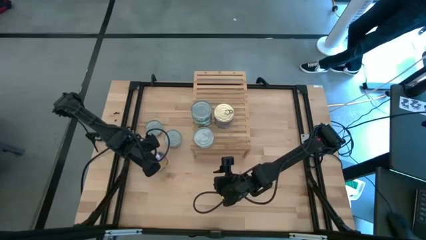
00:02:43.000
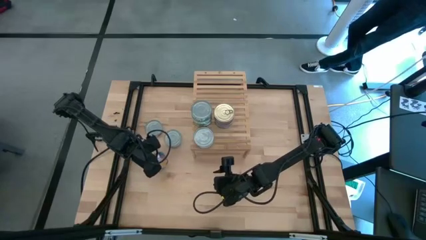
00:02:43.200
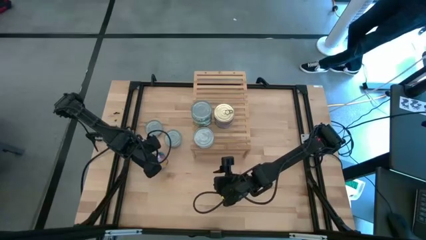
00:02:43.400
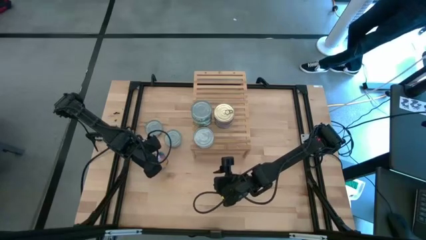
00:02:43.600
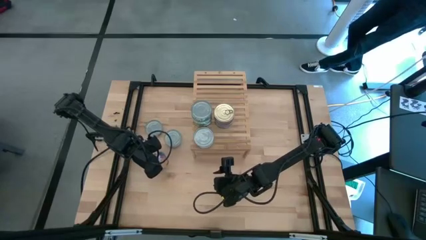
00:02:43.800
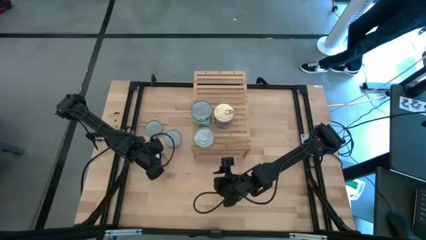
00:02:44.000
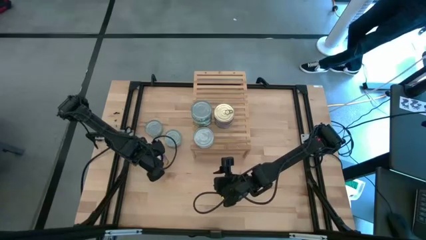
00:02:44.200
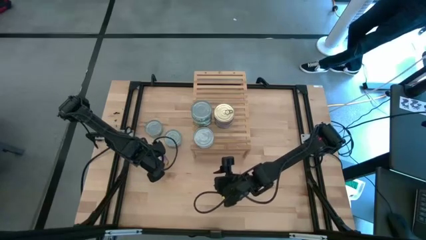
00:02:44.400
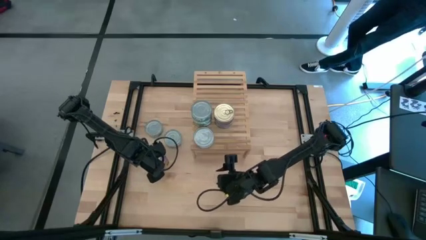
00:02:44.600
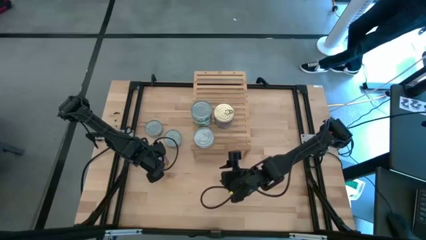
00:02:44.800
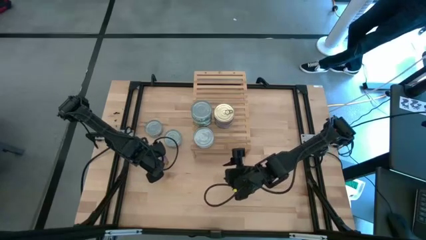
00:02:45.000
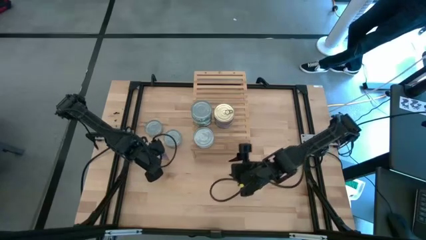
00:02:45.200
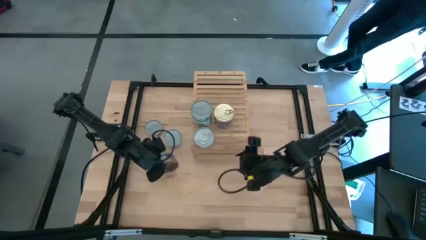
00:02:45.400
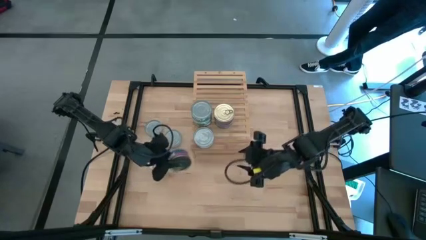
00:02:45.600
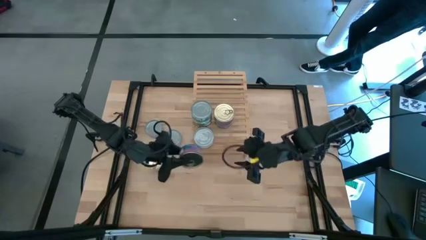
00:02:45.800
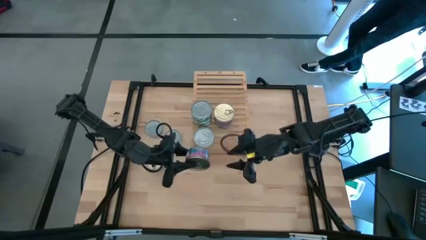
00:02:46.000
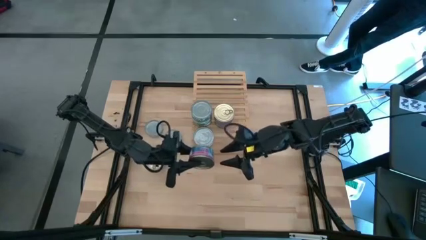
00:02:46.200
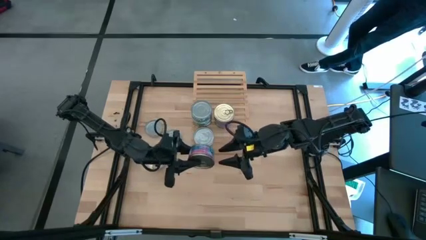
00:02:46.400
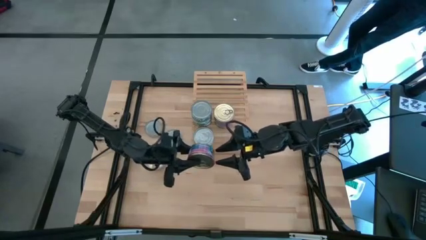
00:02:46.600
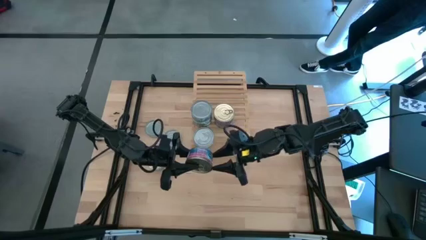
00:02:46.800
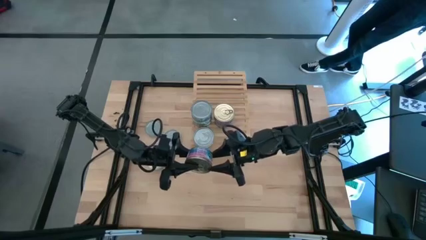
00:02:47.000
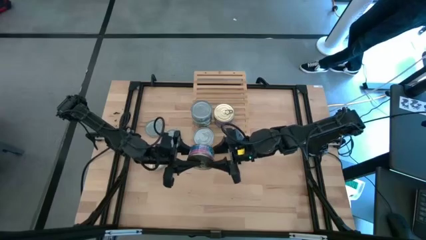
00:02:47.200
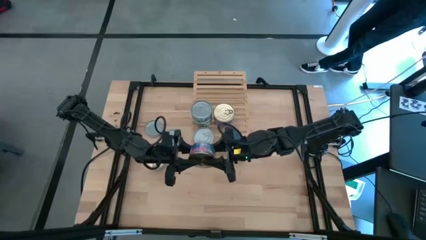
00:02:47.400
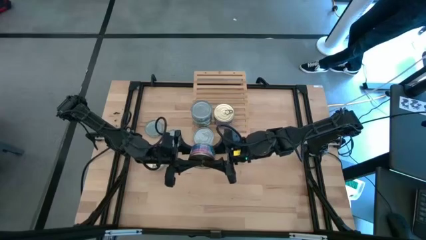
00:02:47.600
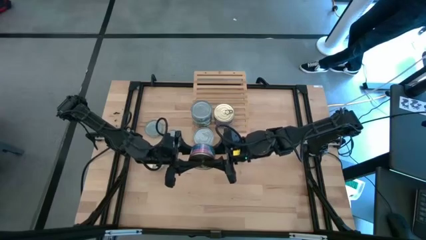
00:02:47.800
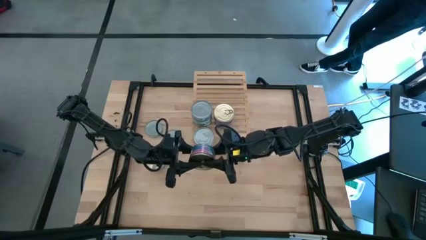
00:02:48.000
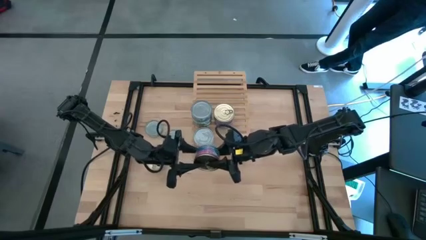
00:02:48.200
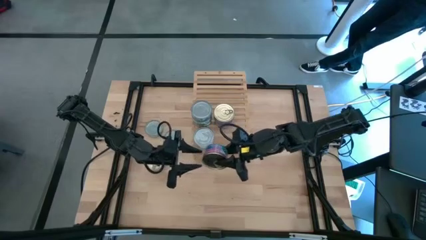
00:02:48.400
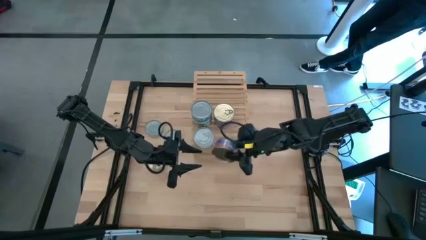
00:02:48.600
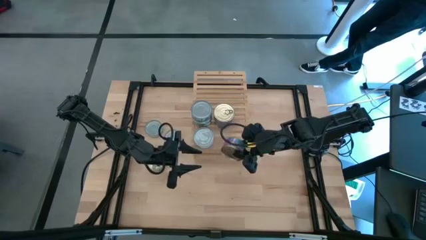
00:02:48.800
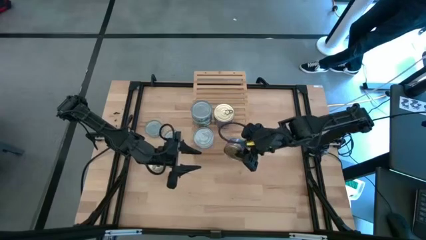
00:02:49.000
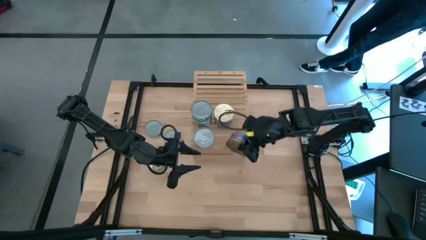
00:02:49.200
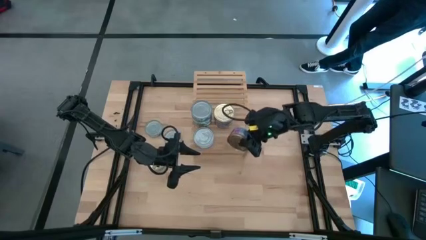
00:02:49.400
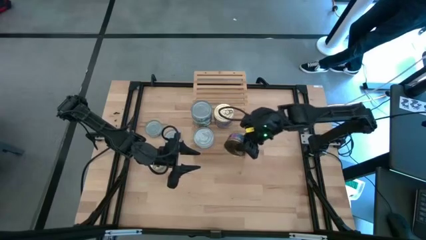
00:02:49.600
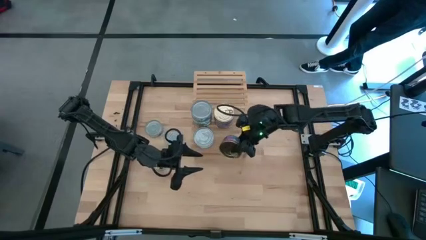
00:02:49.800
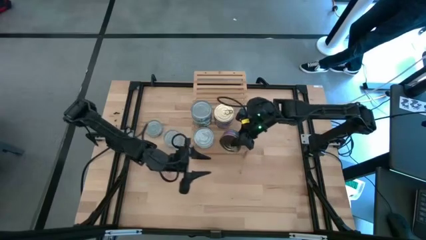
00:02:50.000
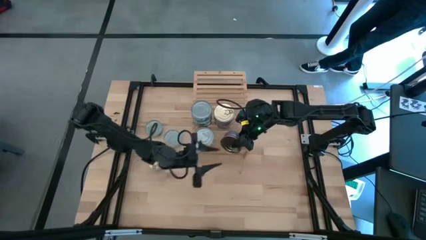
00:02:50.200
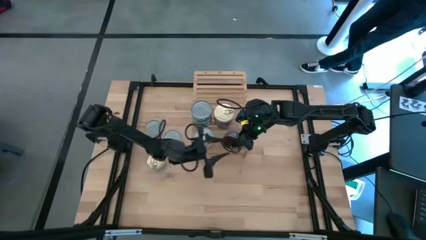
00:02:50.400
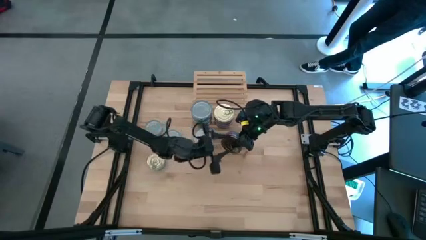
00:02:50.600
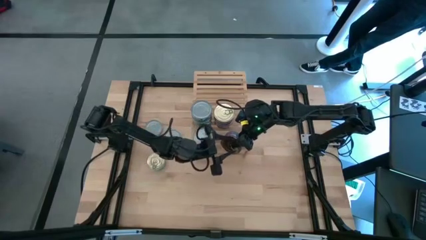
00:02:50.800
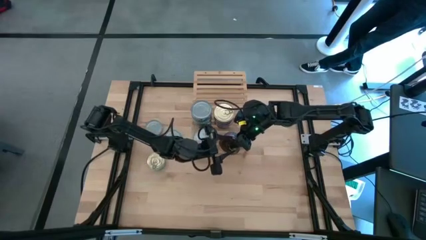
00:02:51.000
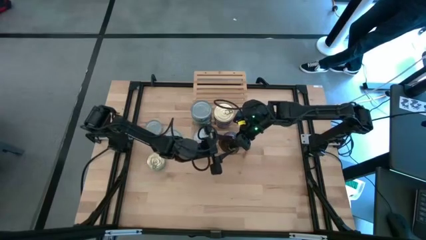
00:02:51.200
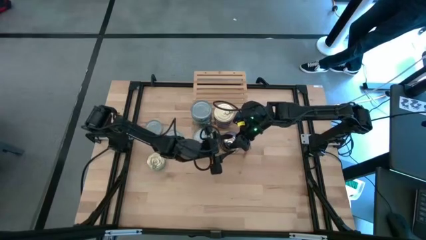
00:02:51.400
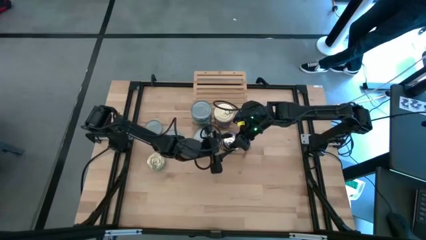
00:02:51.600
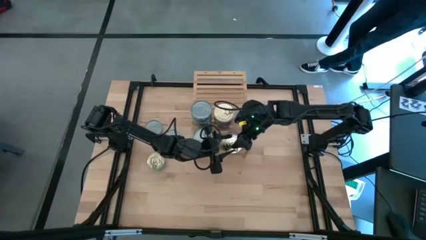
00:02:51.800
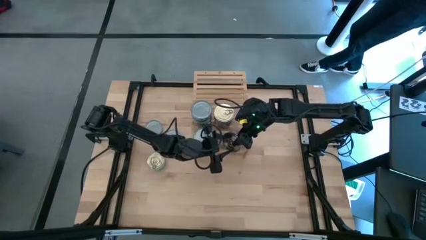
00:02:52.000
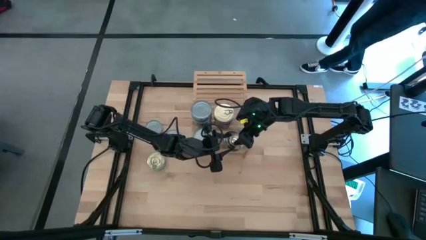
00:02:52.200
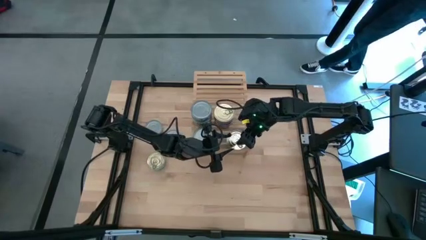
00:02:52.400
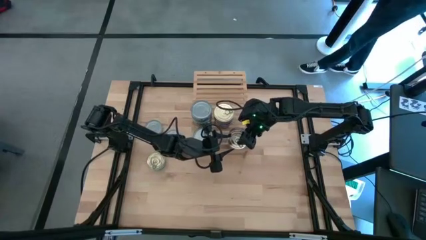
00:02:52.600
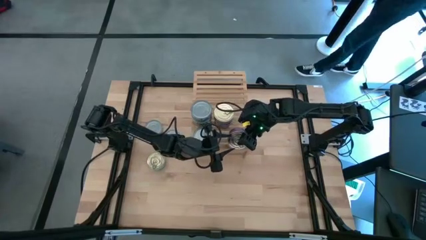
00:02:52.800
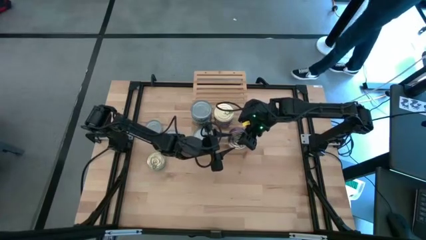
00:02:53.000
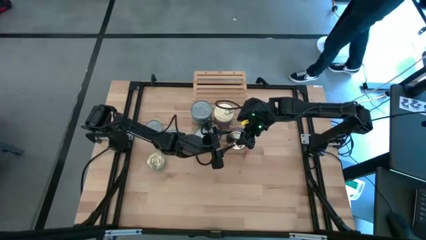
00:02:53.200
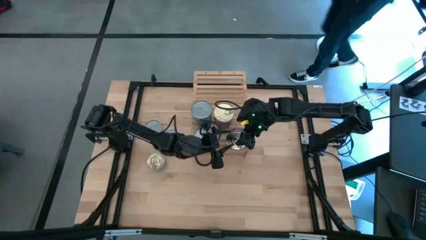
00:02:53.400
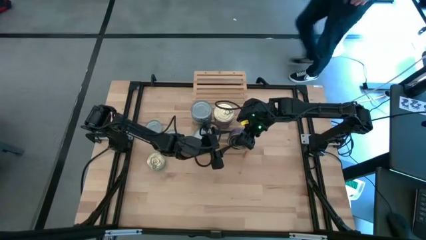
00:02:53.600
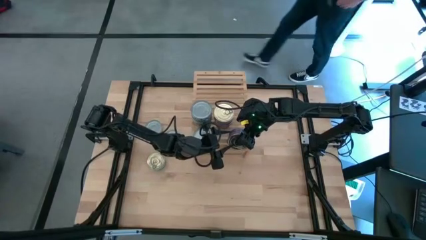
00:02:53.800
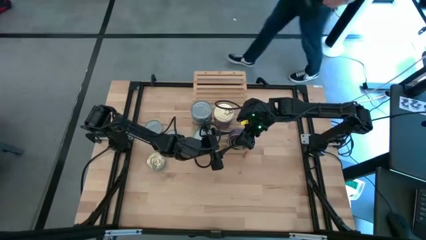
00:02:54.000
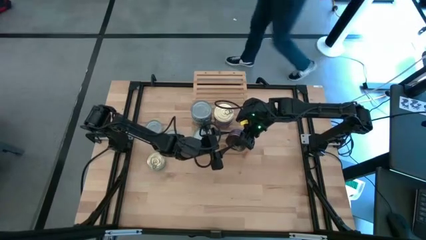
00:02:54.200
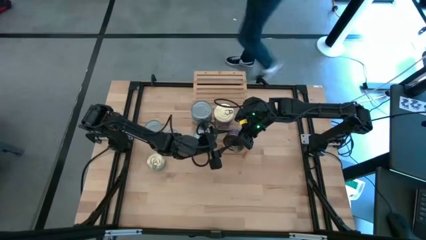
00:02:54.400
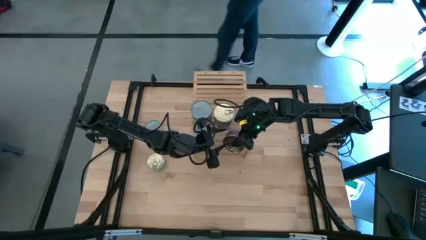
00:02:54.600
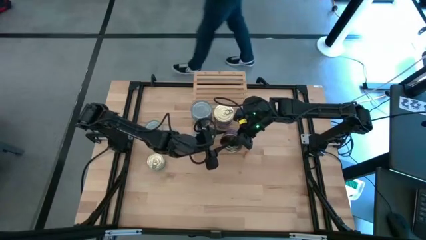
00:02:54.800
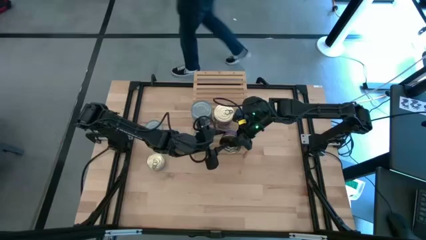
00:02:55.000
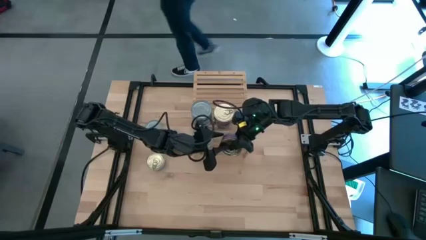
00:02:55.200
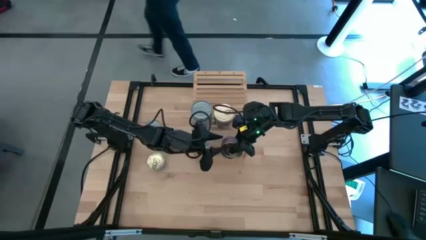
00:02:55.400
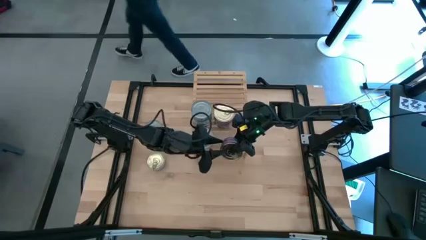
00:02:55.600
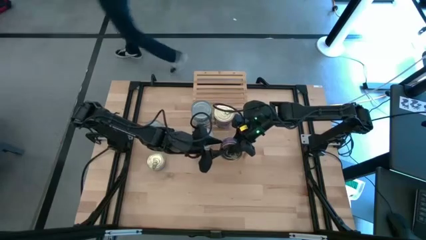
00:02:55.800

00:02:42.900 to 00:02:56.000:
Task: Stack canned seafood by type on shelf
Put the blue tuna can on the shelf

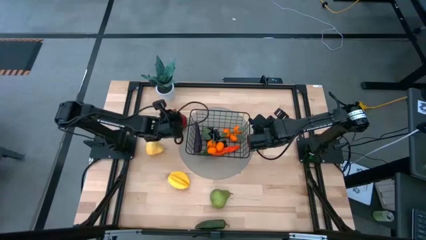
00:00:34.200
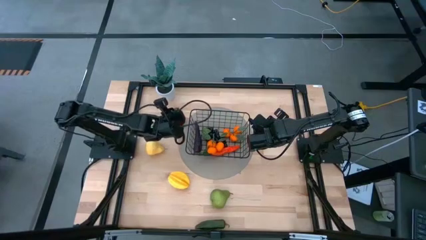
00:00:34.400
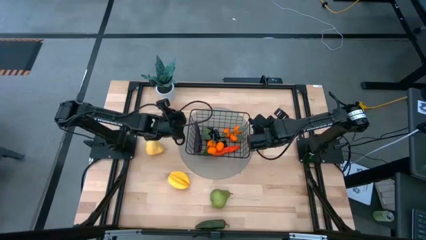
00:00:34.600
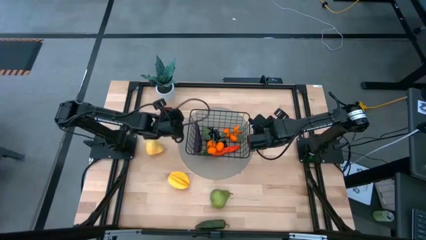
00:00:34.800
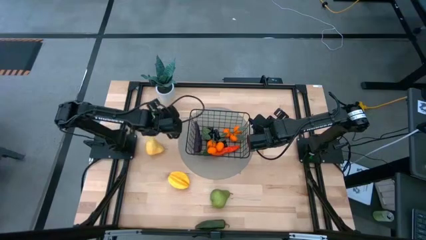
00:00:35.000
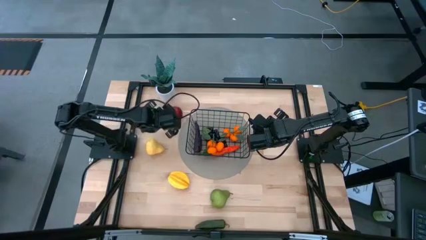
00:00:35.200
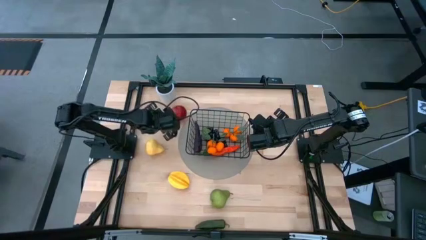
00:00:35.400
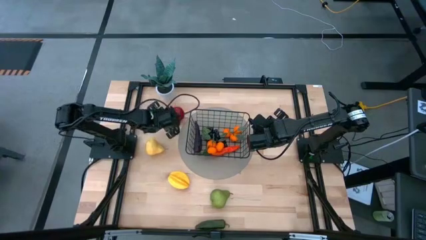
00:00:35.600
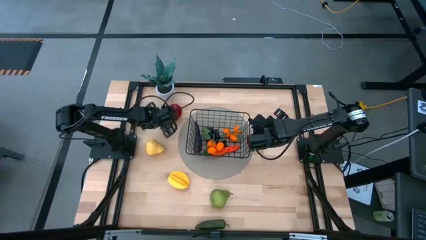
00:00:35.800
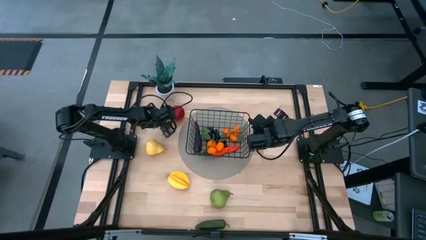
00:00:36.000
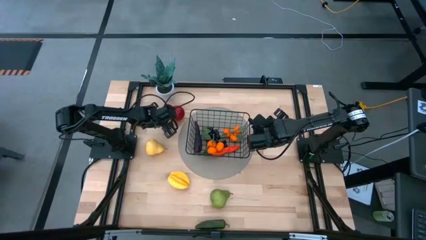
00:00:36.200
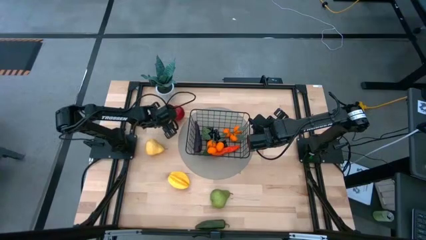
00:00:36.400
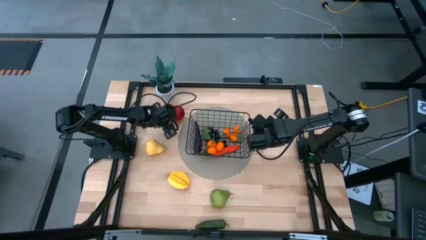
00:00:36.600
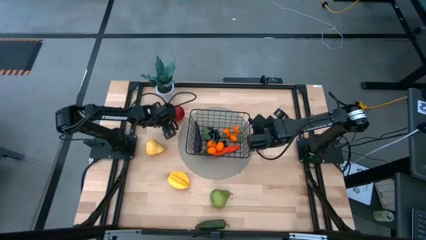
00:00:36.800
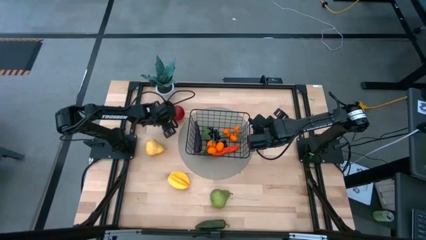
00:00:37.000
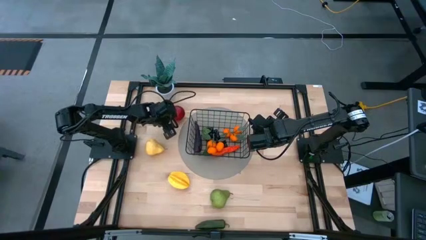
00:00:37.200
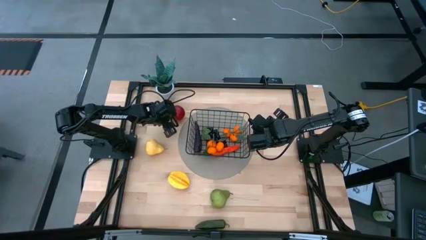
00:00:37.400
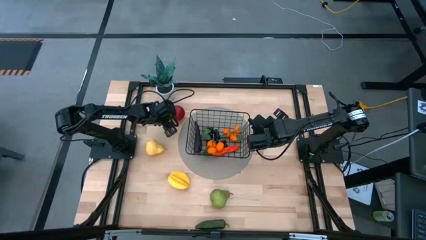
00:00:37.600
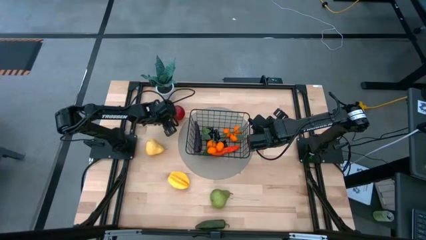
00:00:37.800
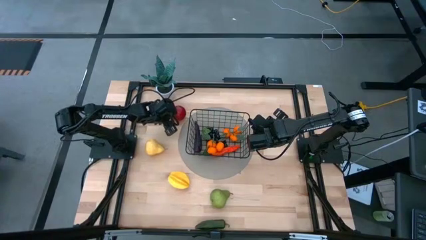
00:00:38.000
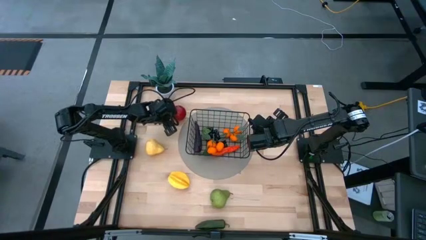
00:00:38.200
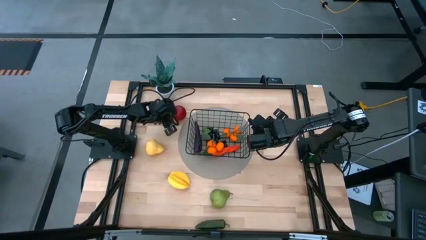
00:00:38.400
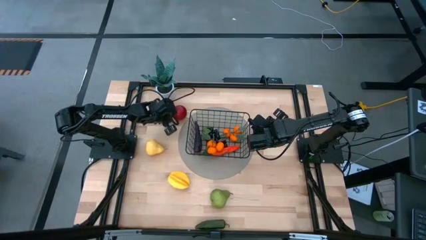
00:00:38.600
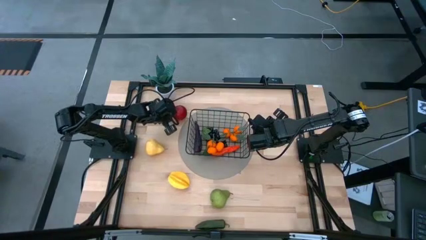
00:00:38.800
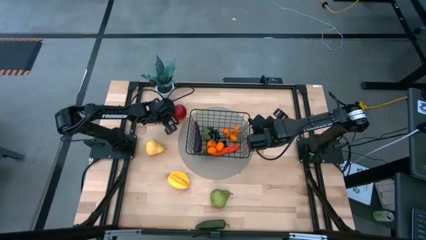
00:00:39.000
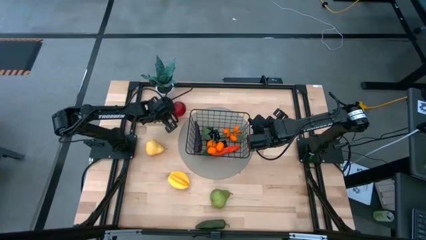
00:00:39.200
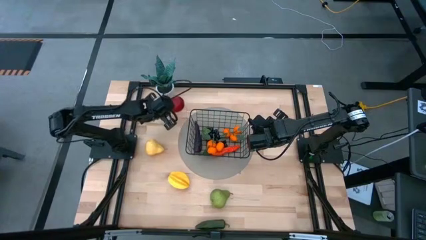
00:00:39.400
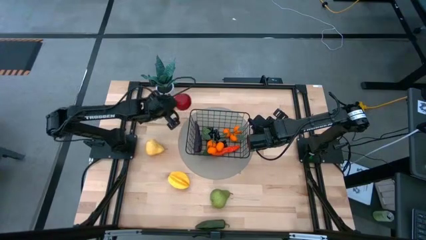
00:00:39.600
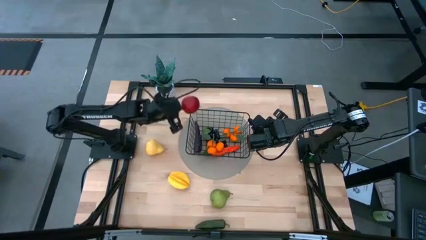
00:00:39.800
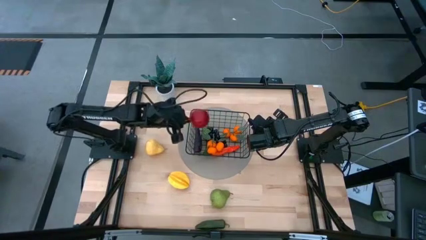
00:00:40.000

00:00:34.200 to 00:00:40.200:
Task: Build produce basket
Put the red pomegranate into the black wire basket
